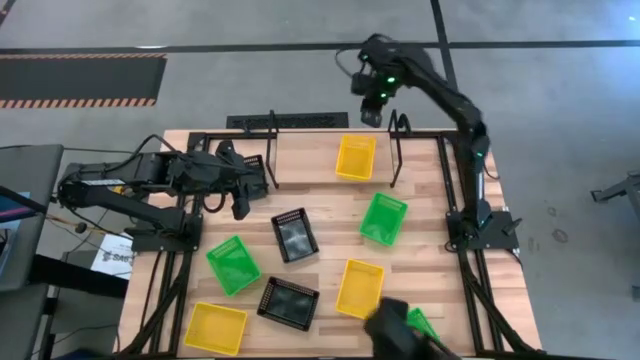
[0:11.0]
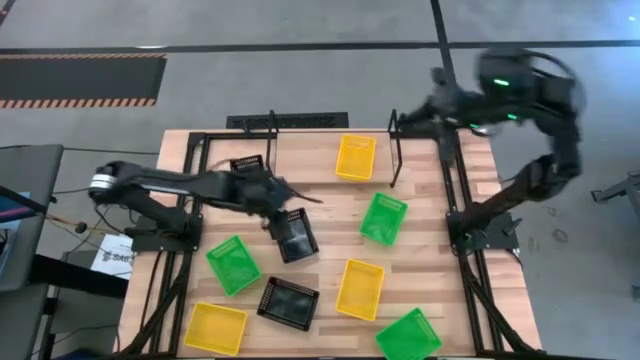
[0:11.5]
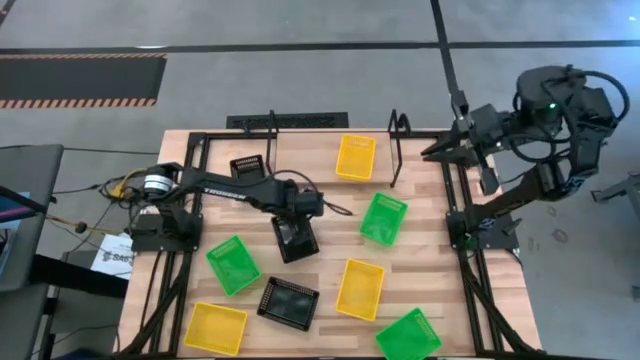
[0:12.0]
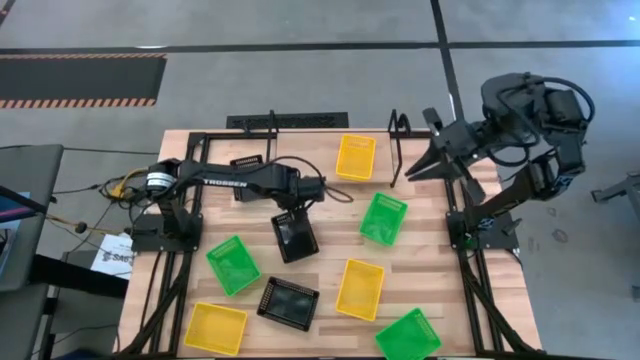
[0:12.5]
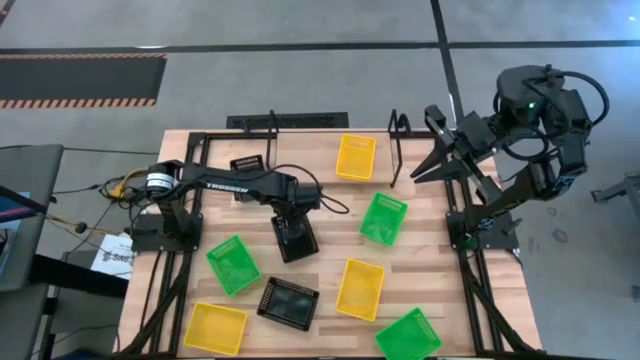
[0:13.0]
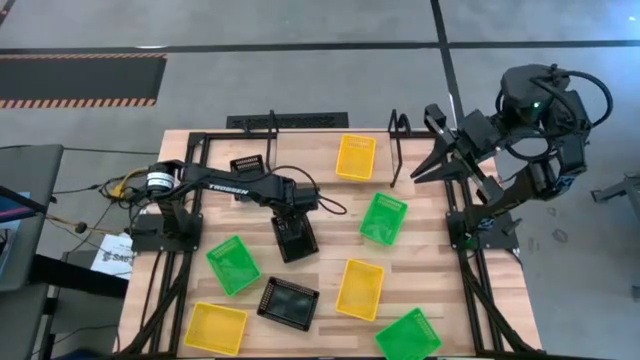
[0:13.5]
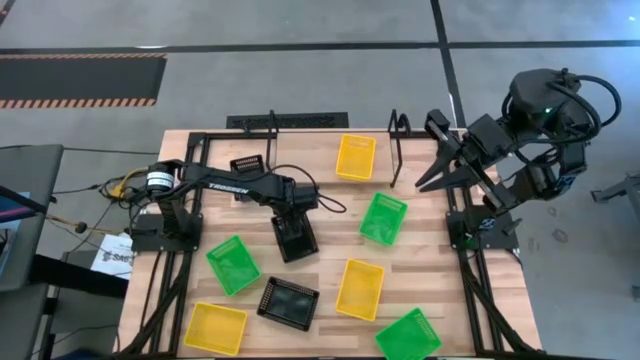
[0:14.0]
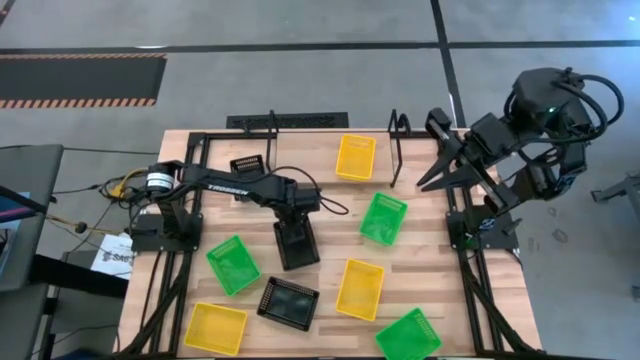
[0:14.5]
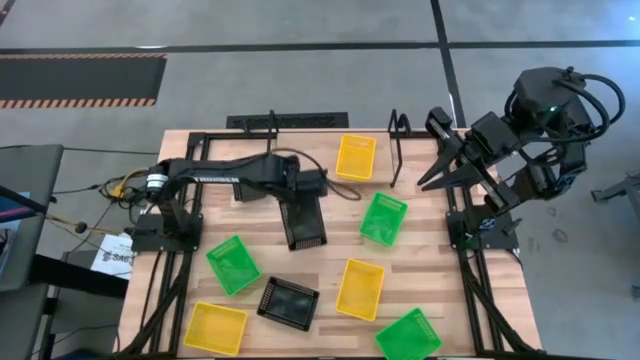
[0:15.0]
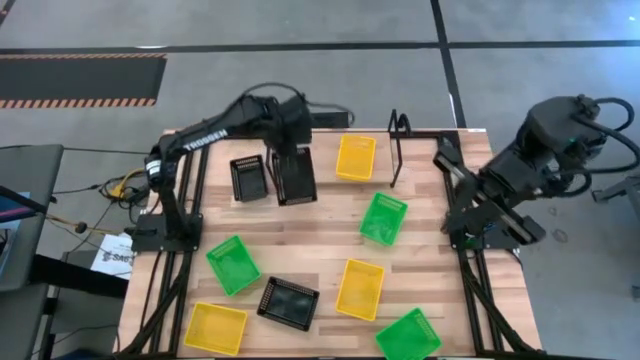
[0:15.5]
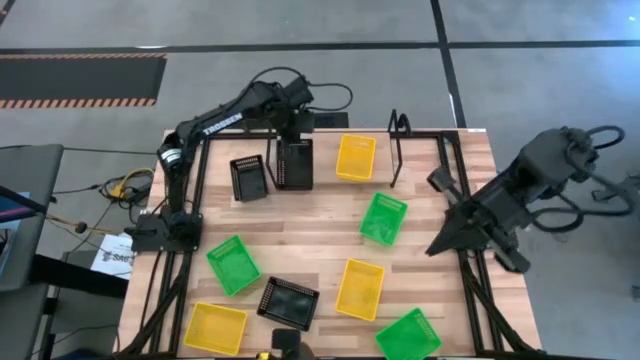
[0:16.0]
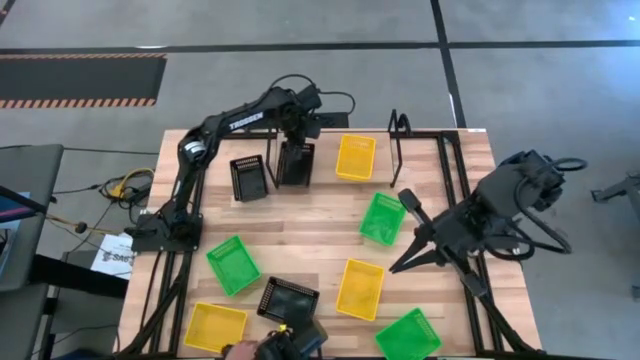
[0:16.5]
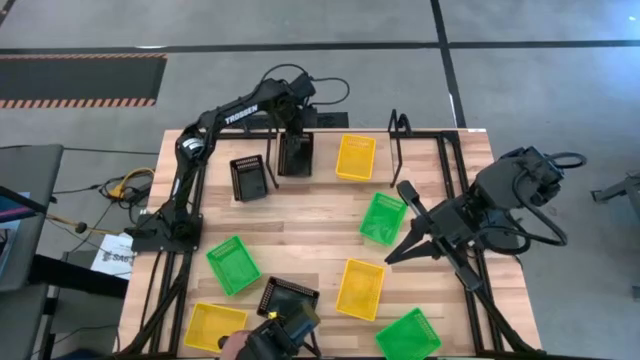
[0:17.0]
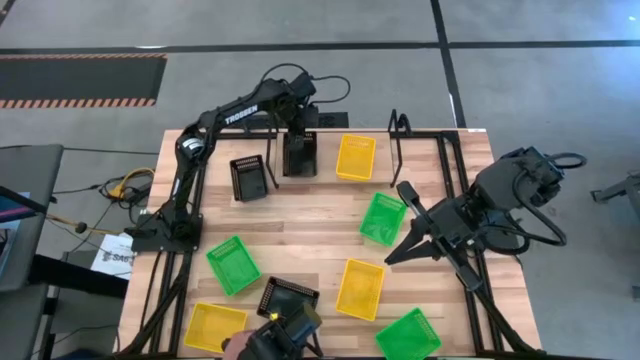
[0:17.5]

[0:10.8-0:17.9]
Task: Stack baskets on shelf by color
Put the middle black bin on the shelf

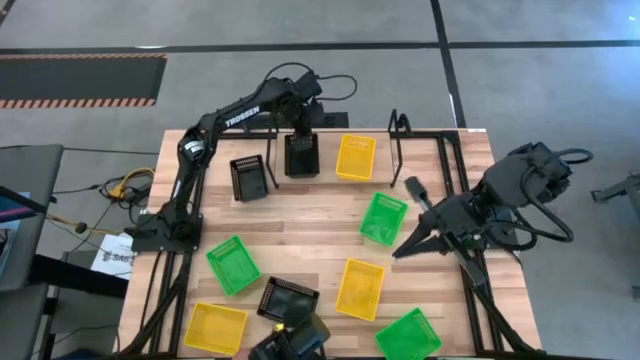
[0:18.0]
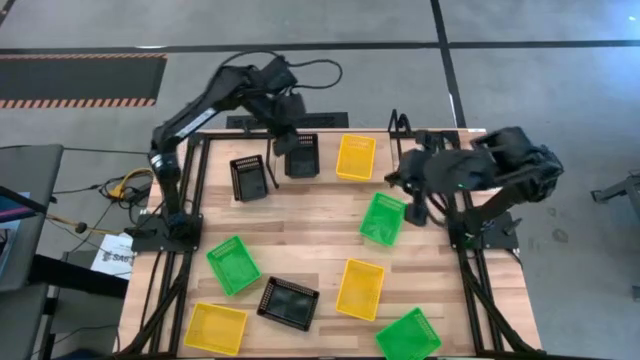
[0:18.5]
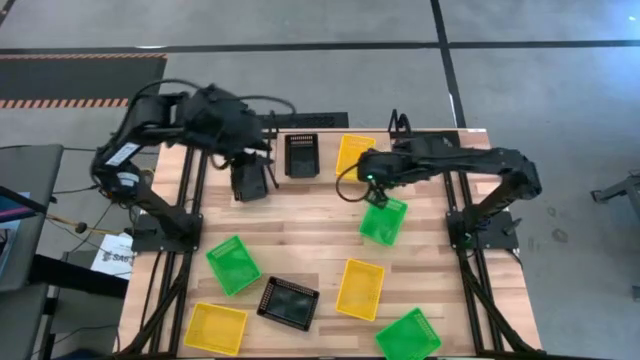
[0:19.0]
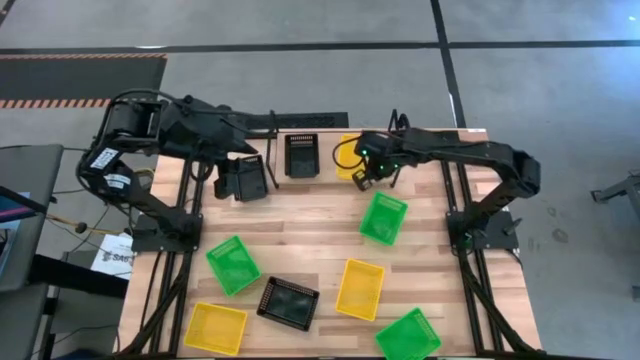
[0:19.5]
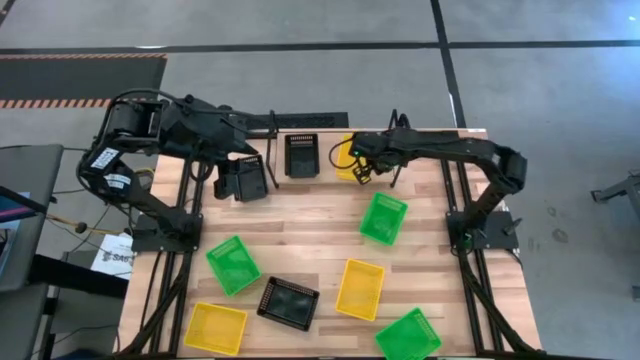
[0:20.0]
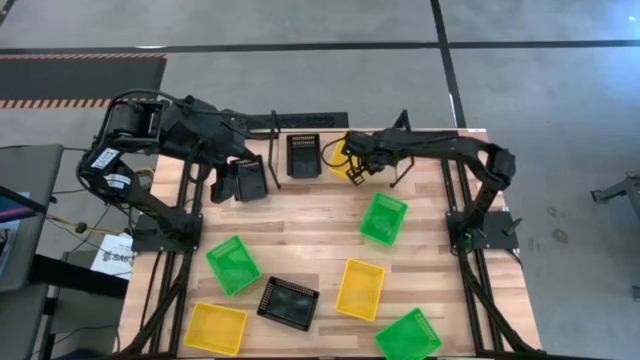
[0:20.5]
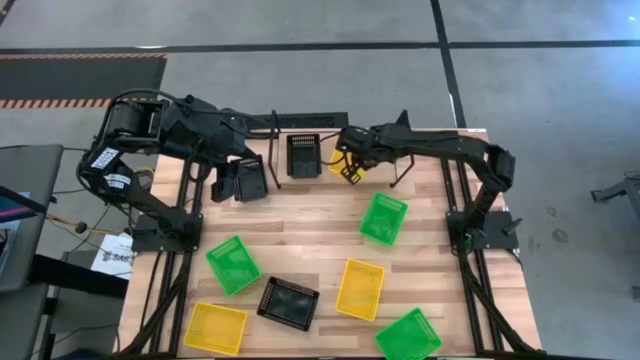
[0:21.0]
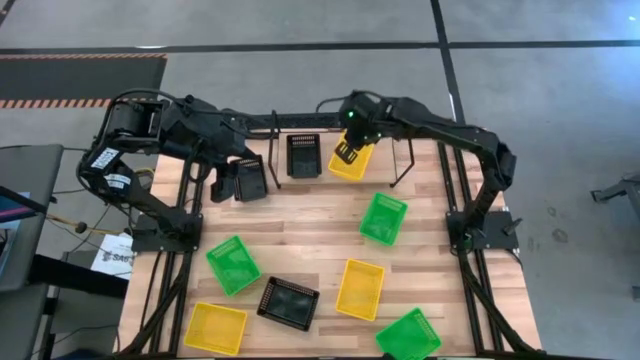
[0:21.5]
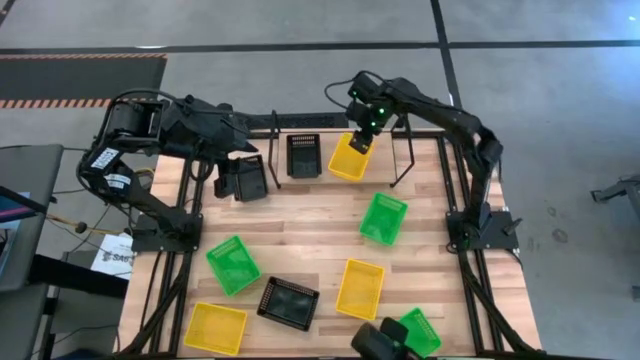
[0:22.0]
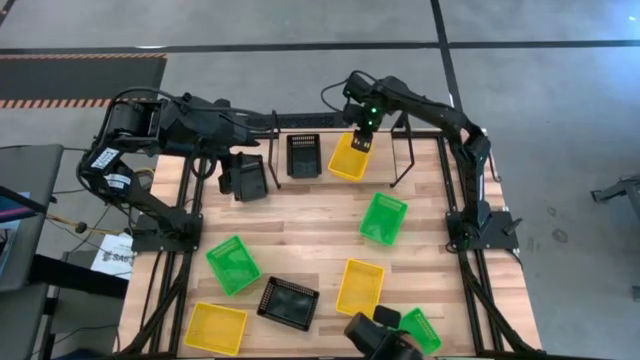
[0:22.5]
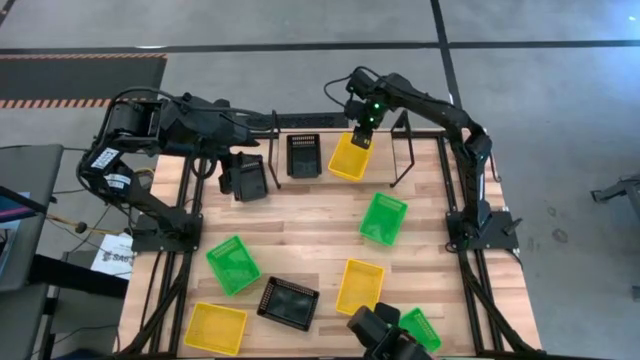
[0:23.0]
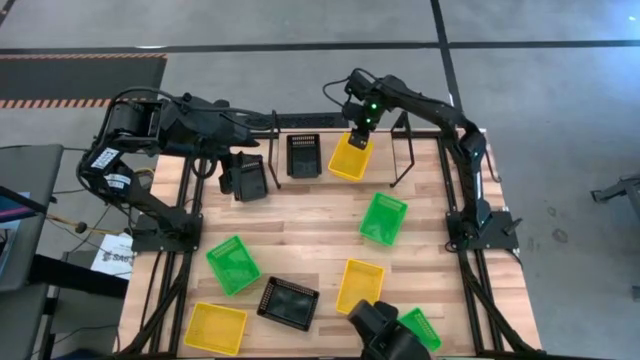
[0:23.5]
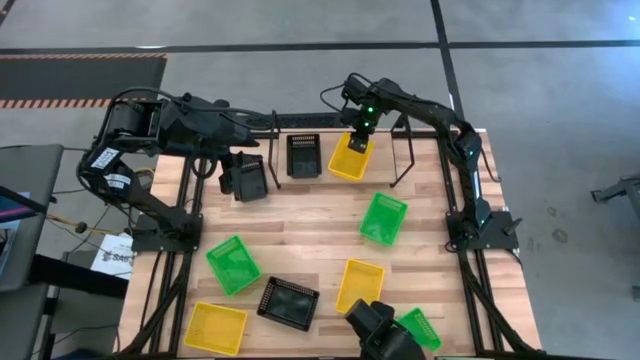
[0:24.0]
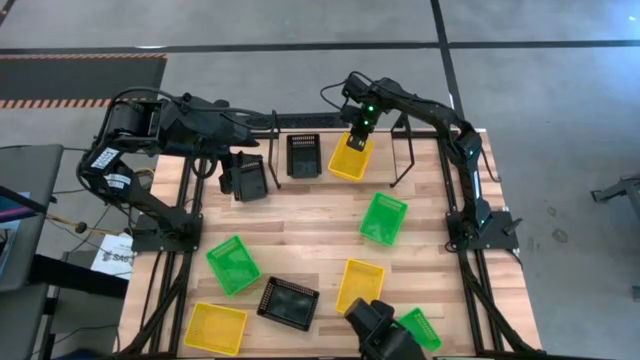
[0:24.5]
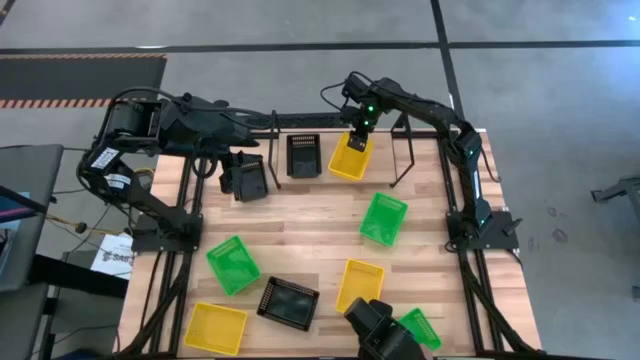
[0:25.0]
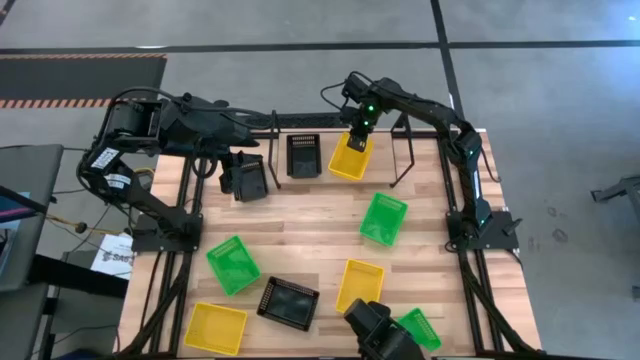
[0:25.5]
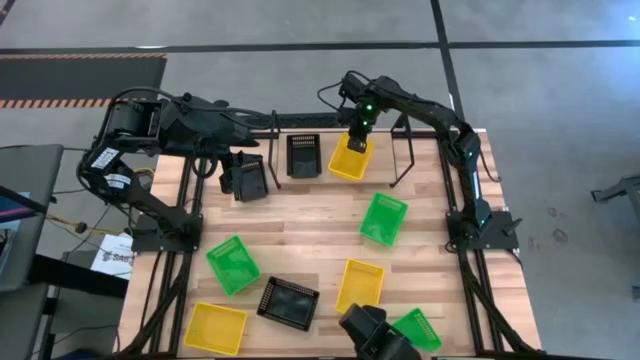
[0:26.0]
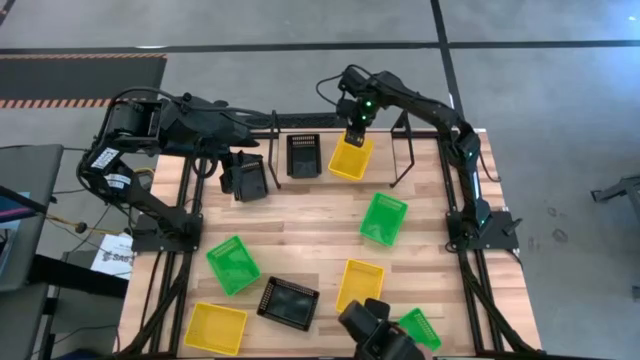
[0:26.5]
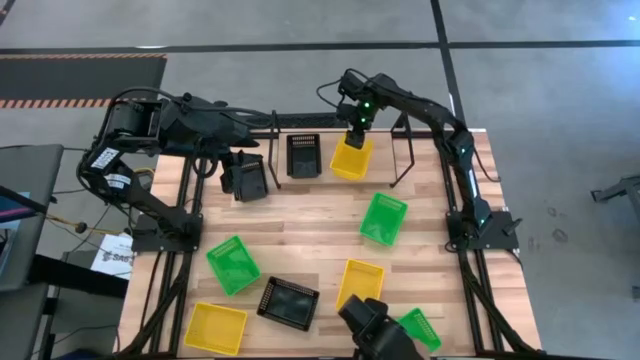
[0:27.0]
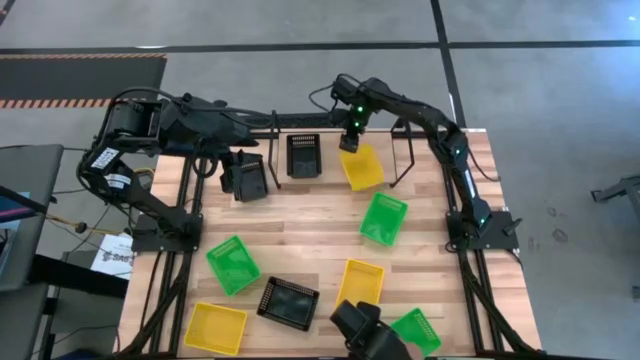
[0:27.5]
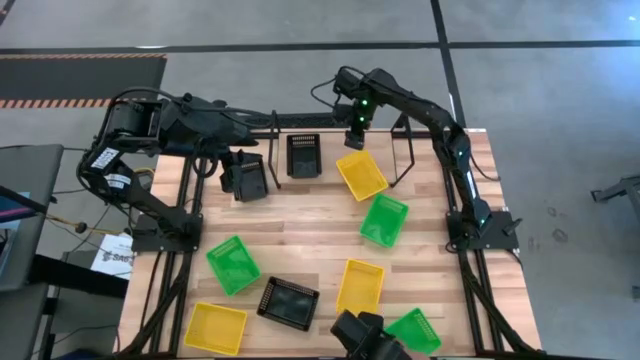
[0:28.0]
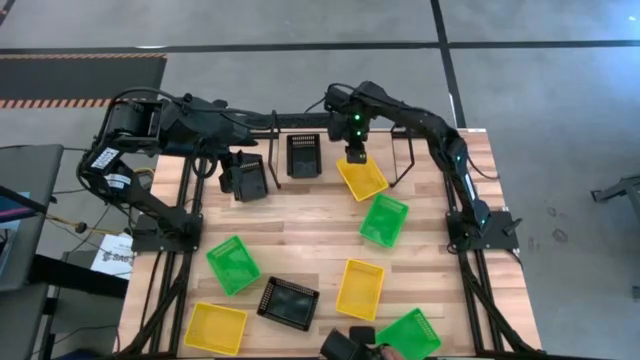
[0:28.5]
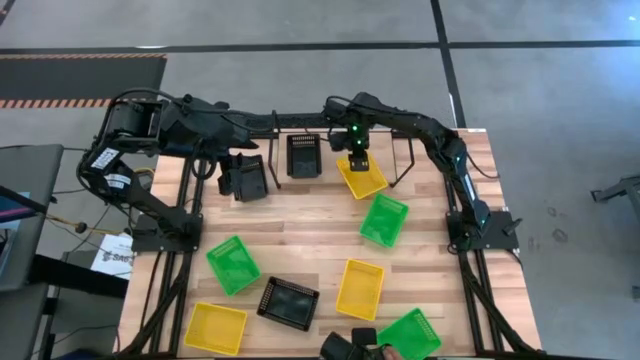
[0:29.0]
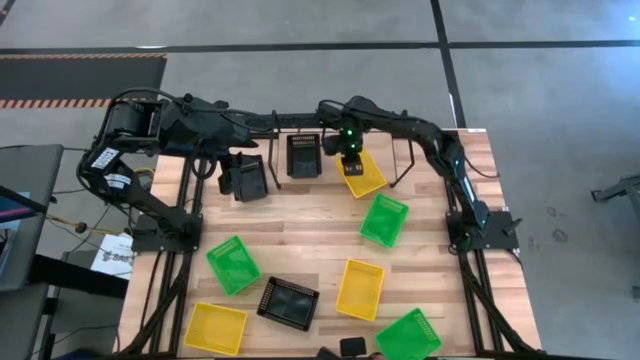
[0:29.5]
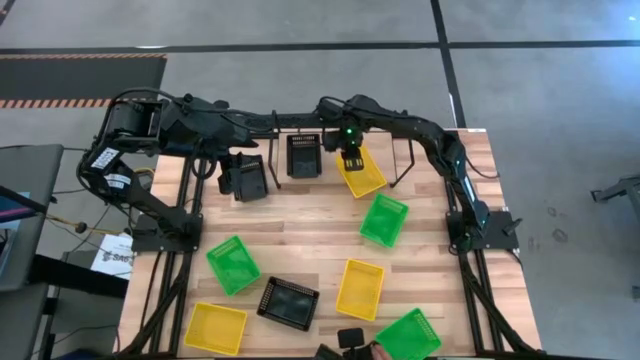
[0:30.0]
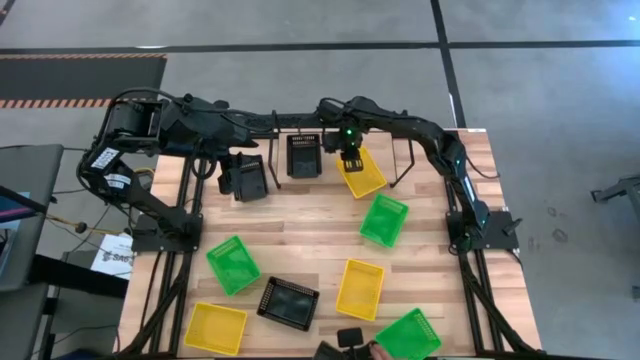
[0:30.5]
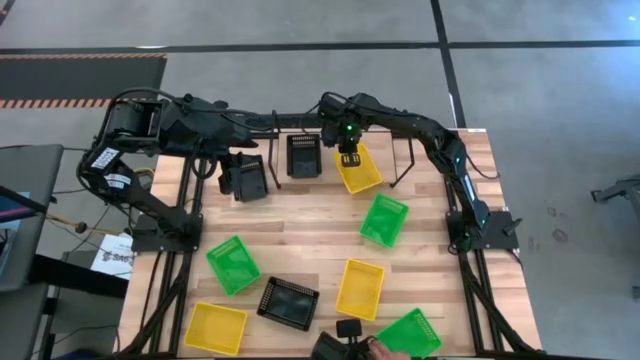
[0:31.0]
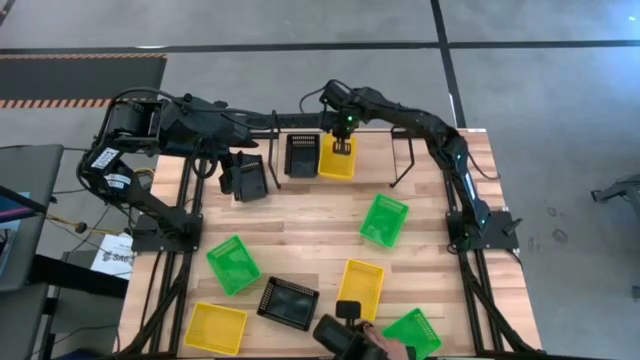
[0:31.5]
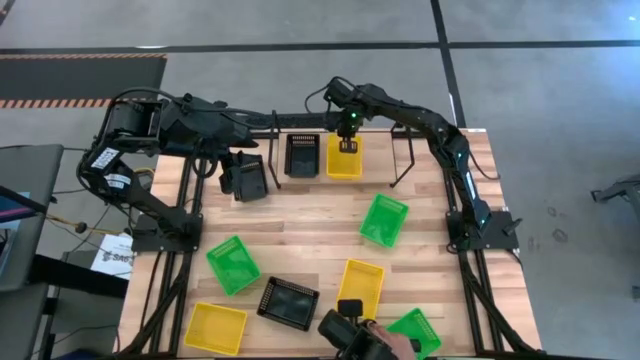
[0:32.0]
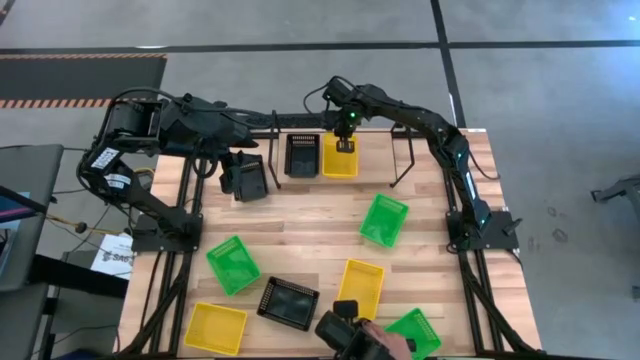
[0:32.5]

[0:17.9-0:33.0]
Adjust the yellow bin on the shelf
